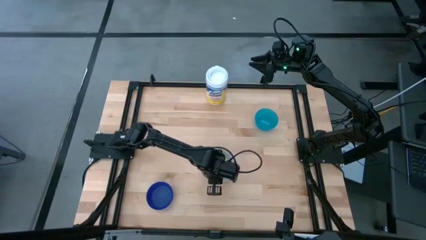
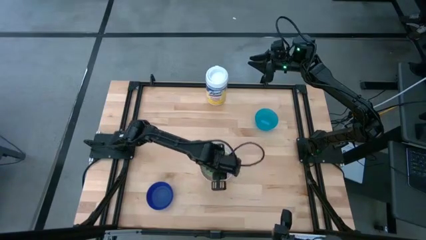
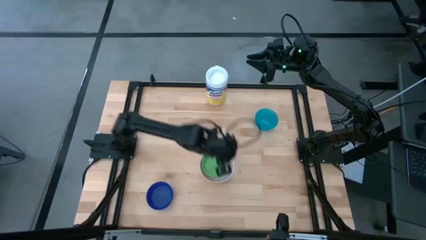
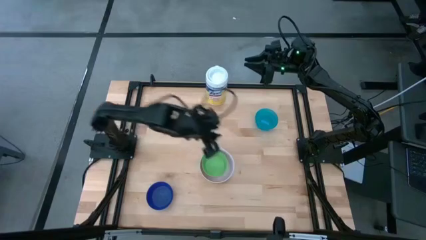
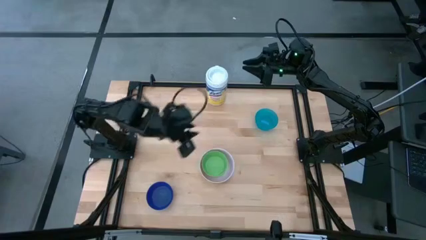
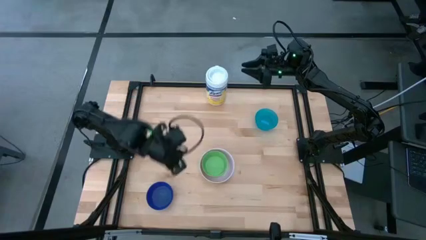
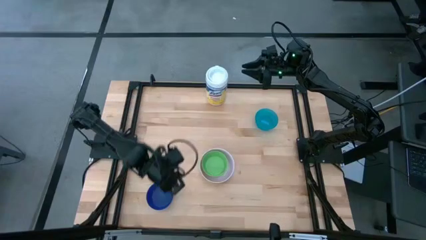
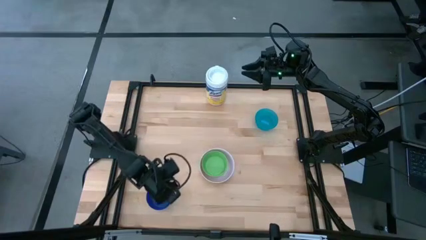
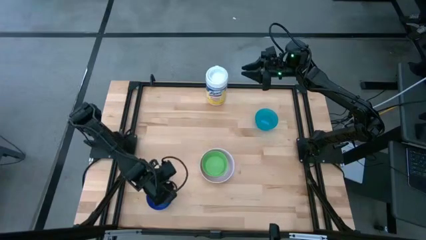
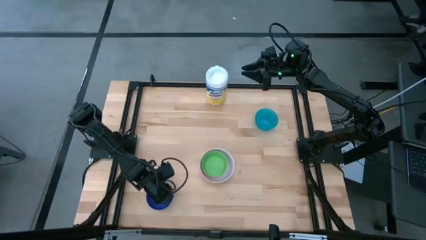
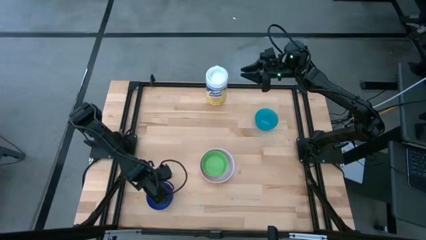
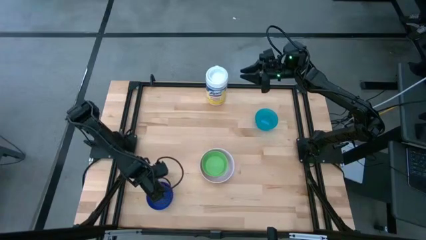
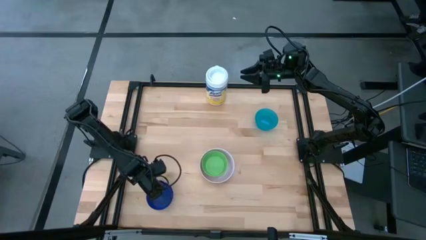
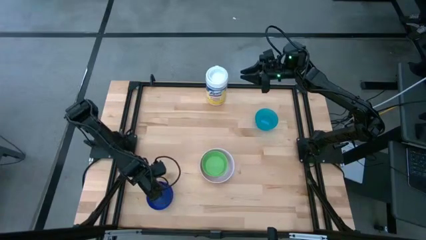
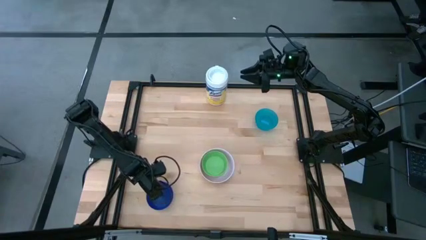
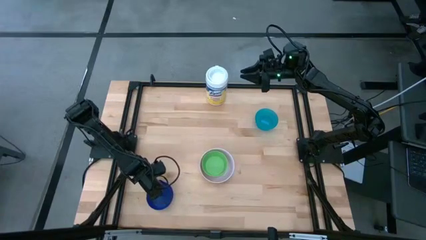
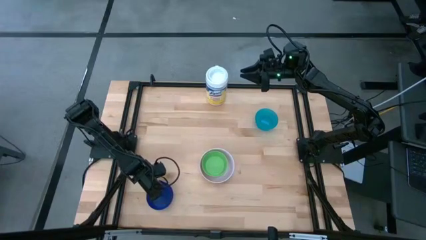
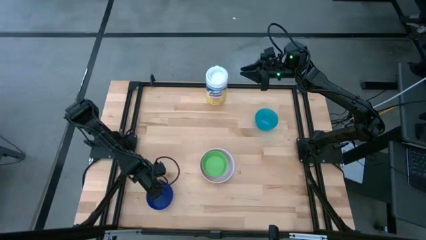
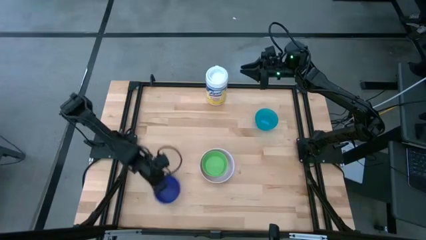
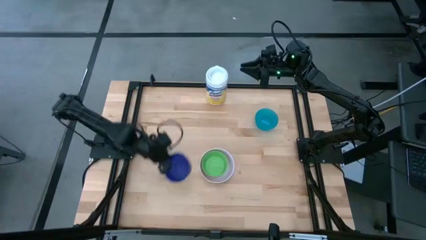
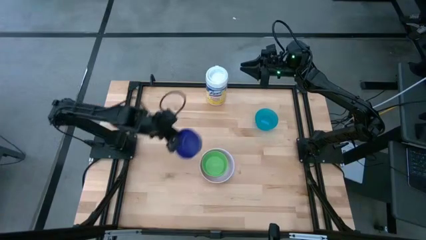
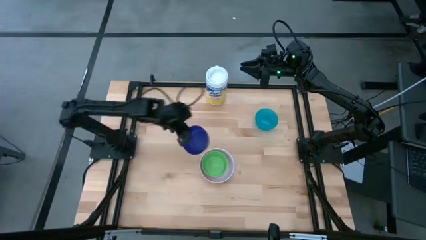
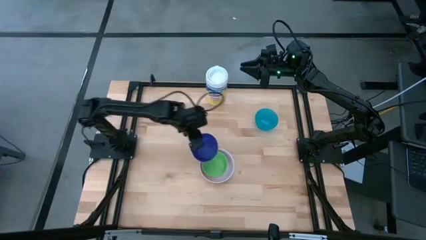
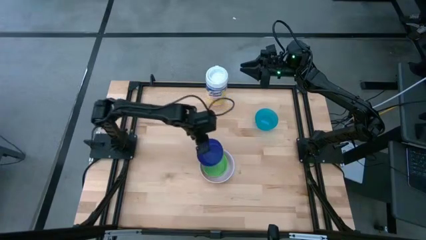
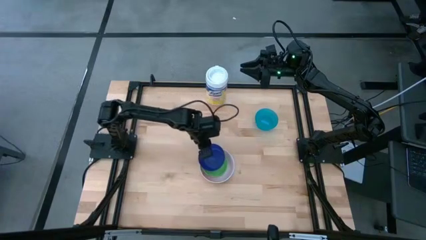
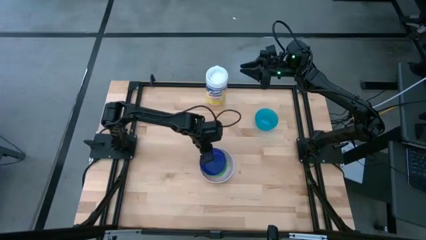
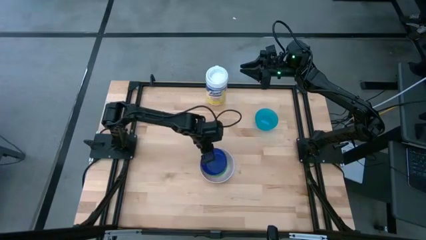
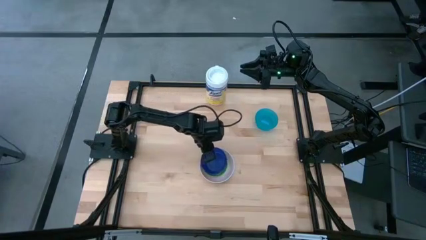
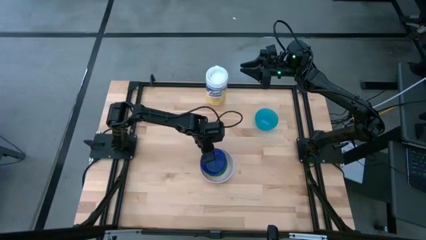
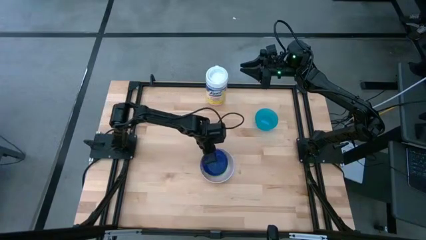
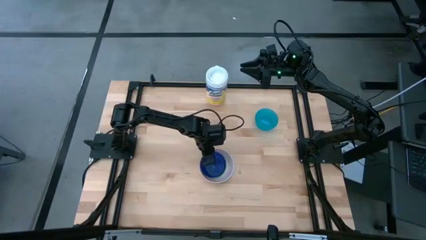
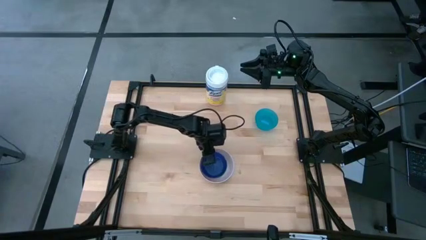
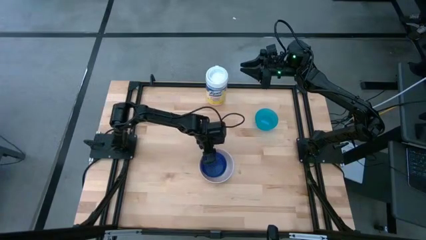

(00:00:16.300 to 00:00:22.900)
Stack the dark blue bowl on top of the green bowl

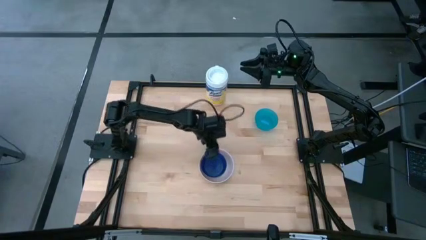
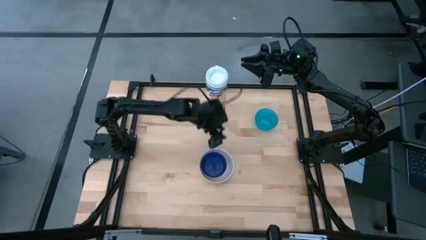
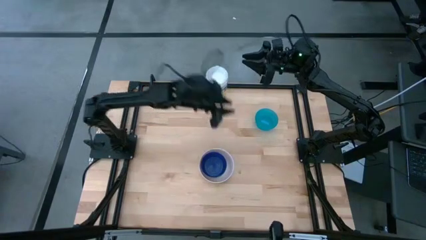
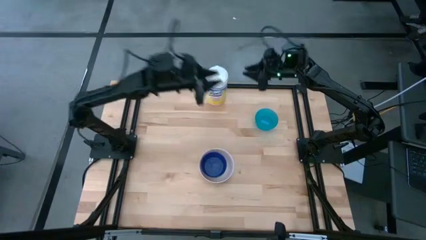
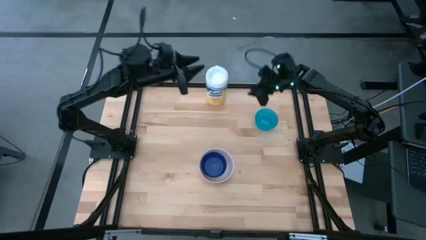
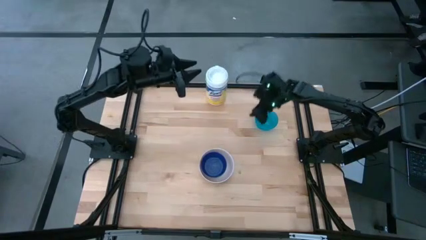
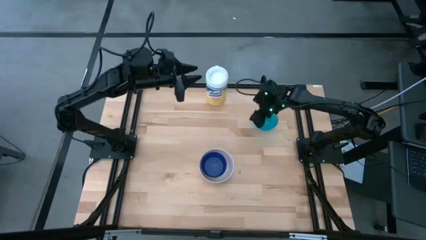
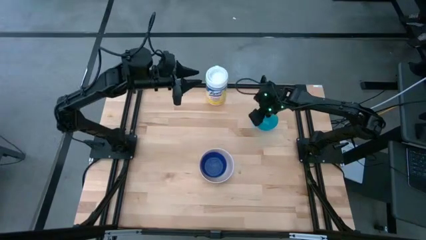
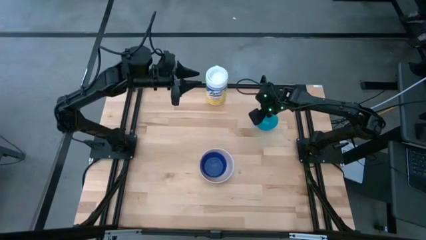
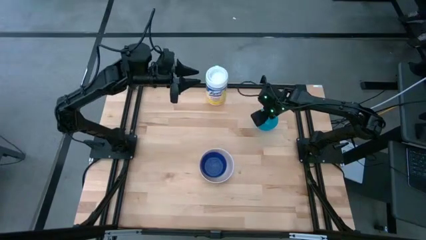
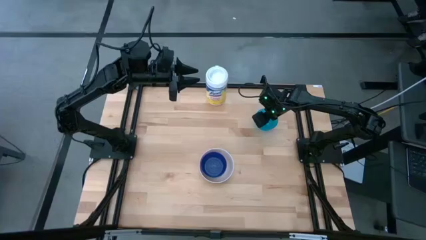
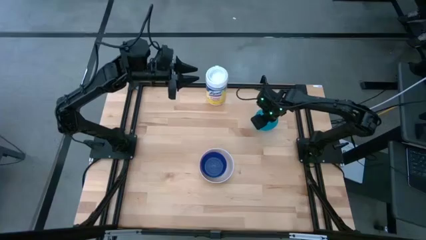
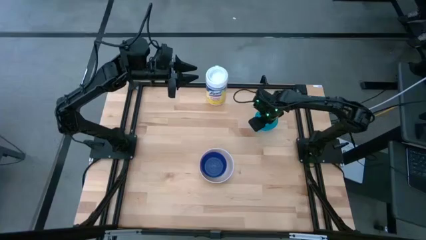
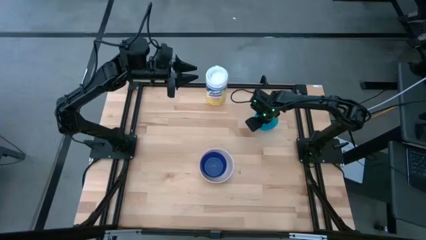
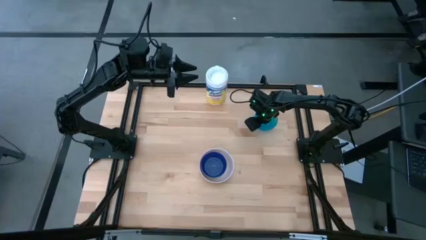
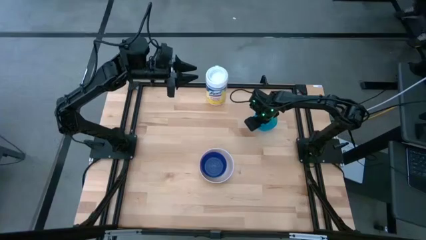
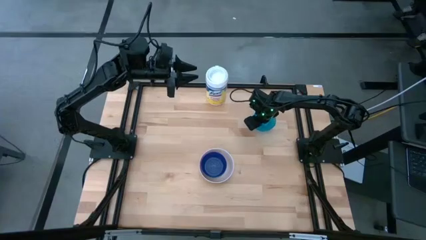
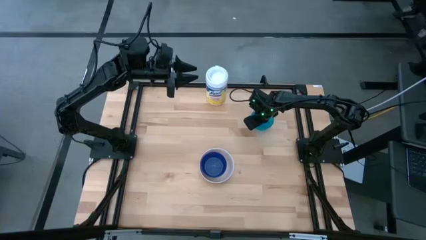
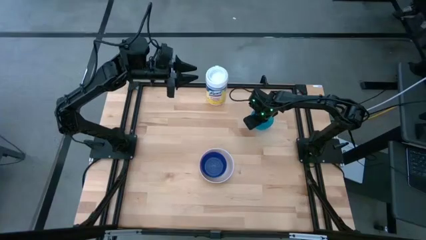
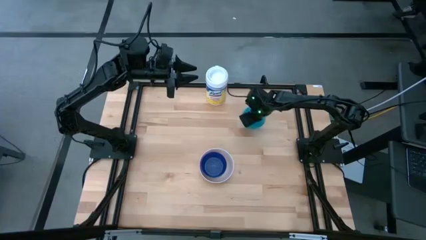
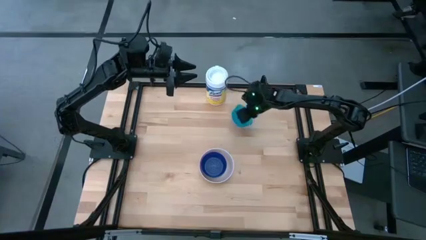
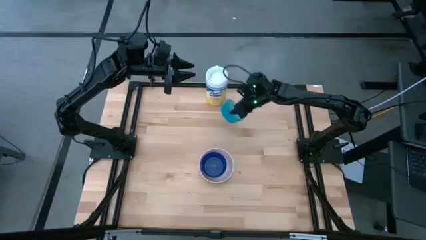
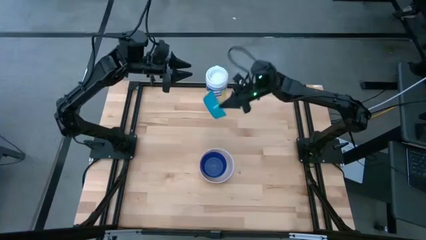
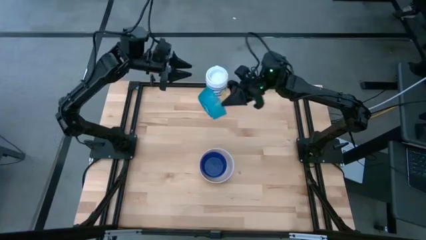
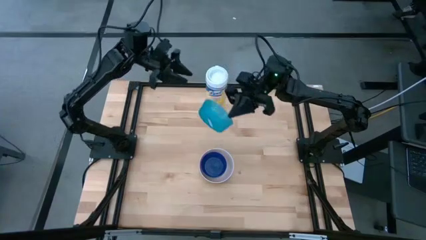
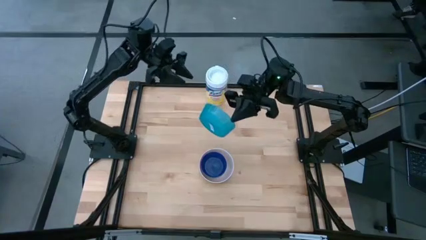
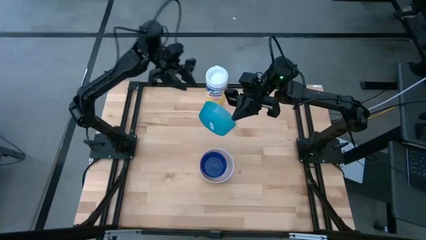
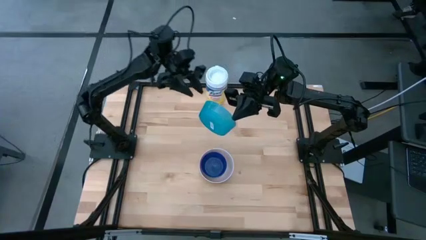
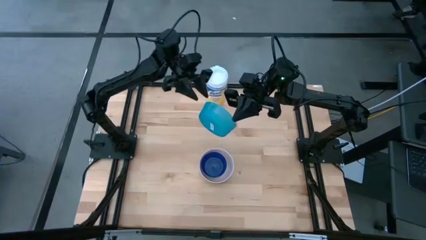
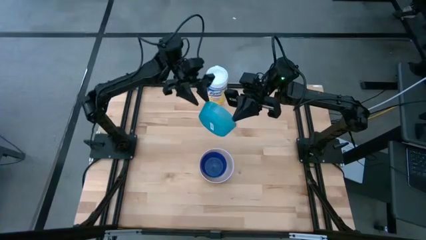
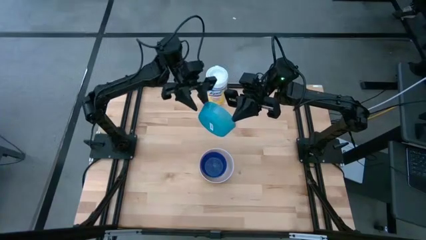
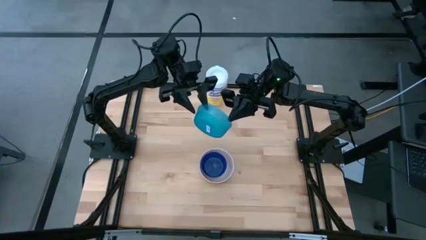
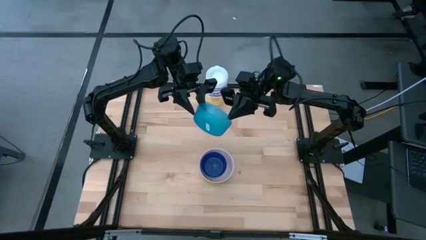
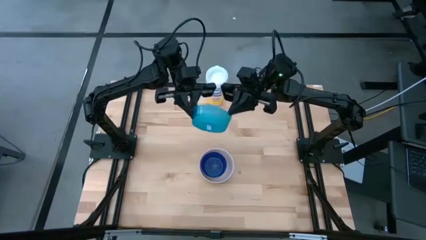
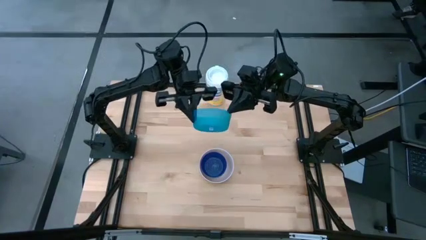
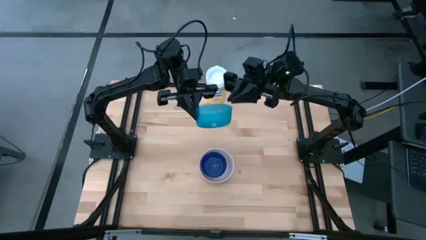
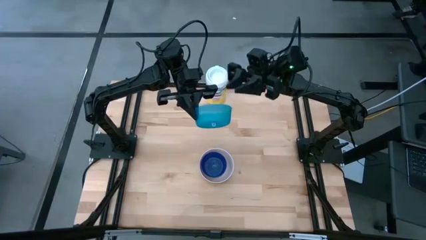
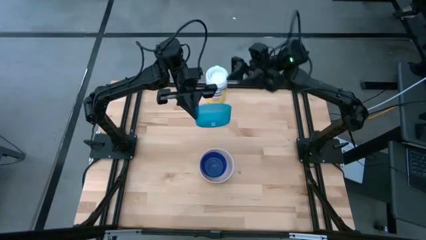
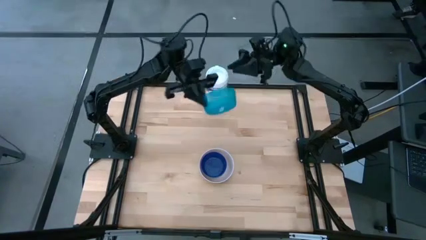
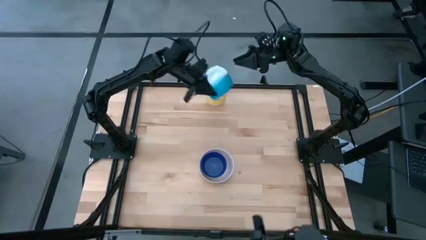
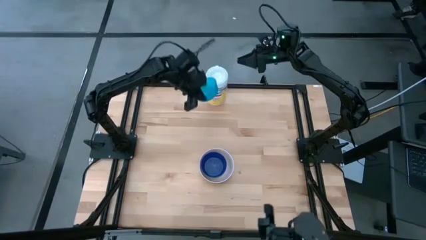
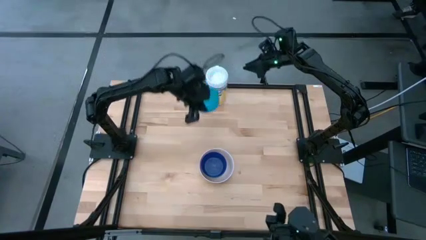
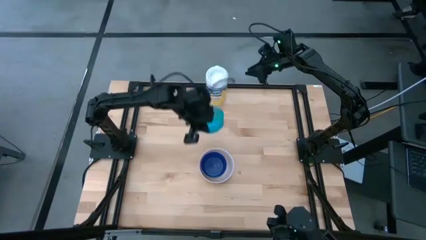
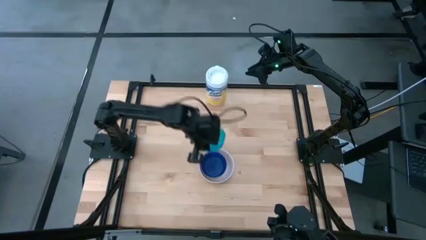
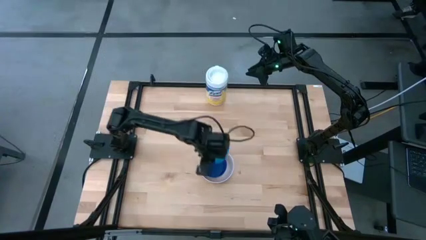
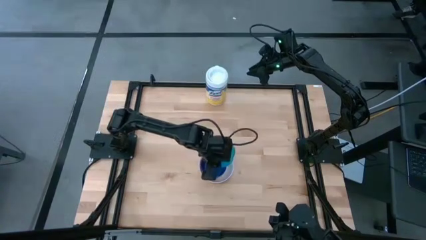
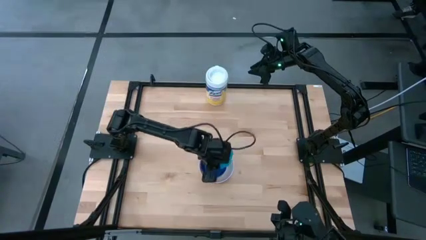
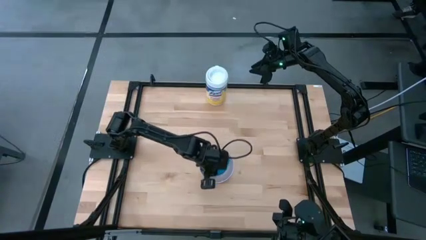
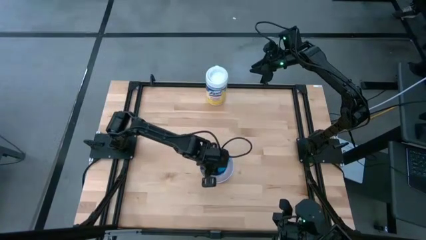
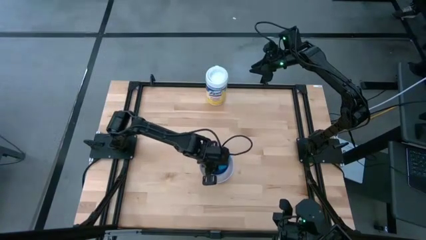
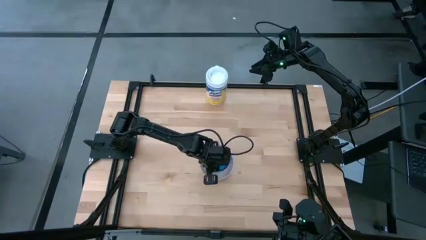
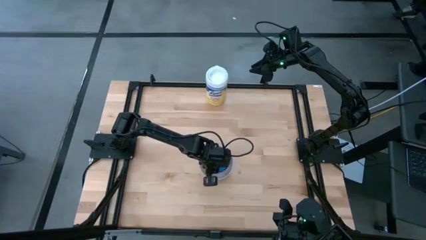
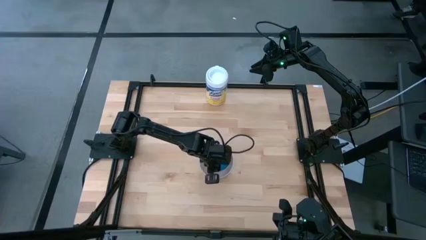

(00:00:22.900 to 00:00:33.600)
Stack the light blue bowl on top of the dark blue bowl
